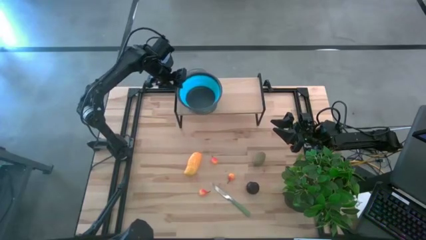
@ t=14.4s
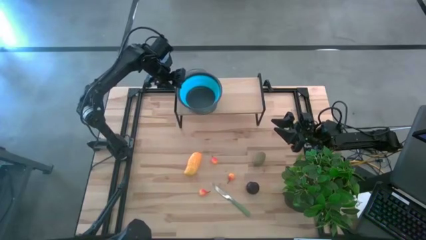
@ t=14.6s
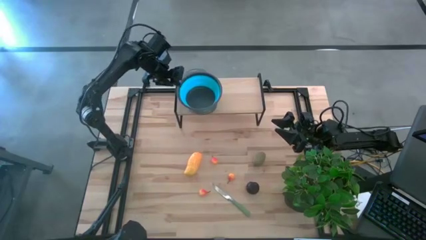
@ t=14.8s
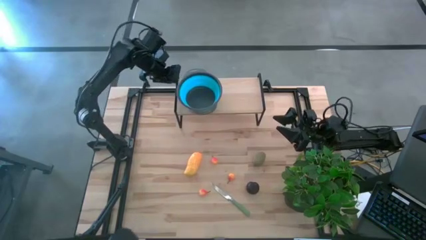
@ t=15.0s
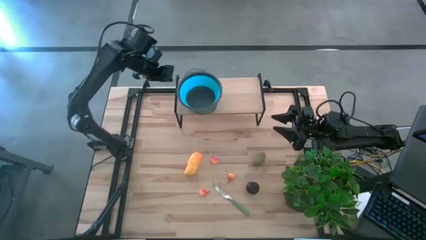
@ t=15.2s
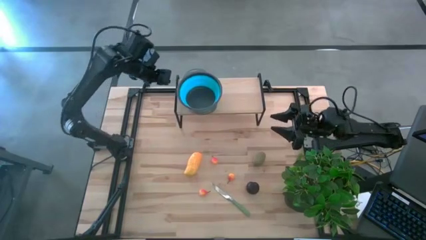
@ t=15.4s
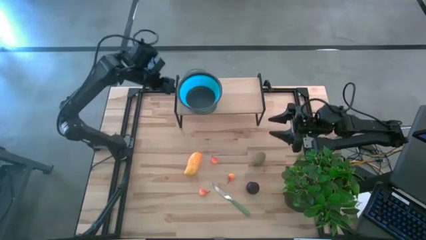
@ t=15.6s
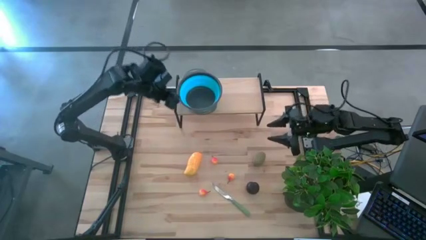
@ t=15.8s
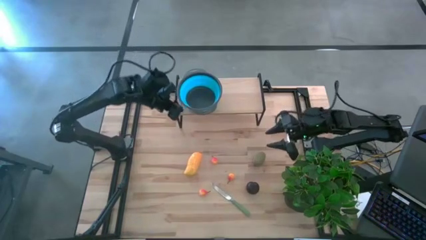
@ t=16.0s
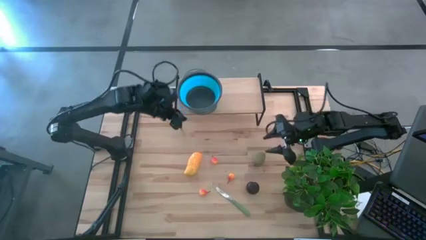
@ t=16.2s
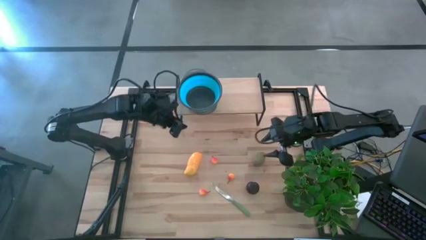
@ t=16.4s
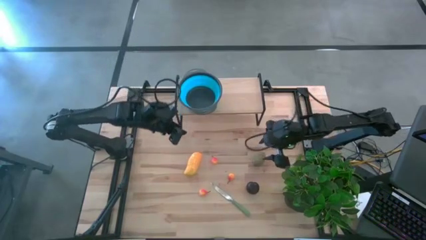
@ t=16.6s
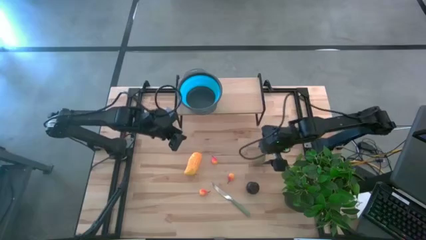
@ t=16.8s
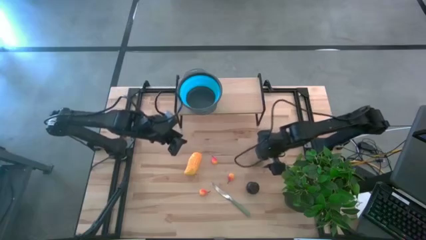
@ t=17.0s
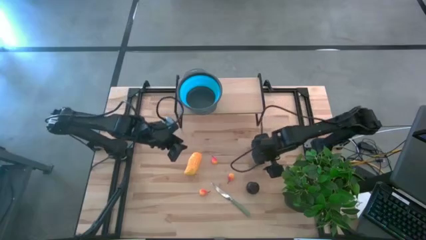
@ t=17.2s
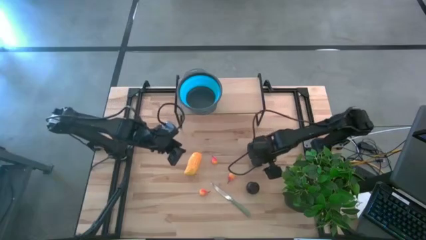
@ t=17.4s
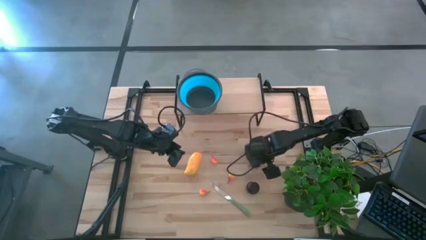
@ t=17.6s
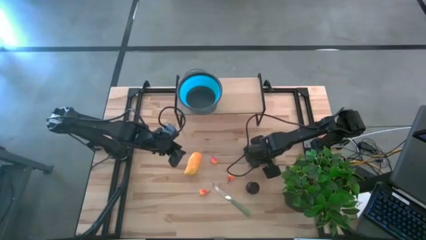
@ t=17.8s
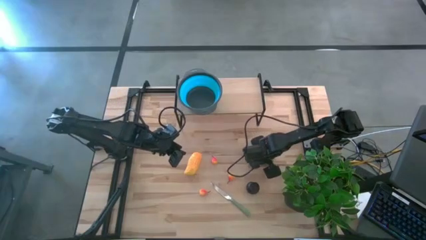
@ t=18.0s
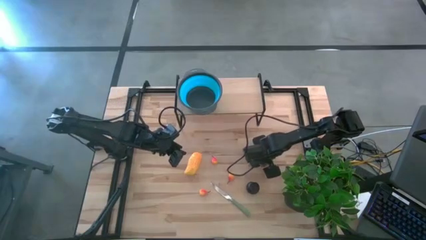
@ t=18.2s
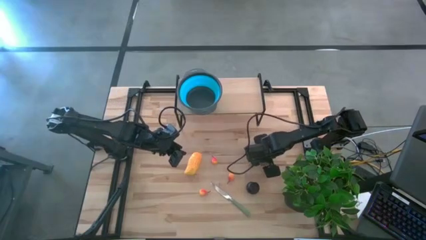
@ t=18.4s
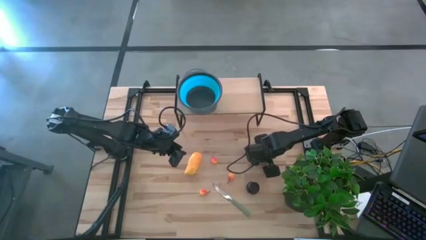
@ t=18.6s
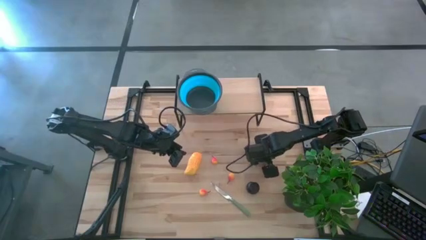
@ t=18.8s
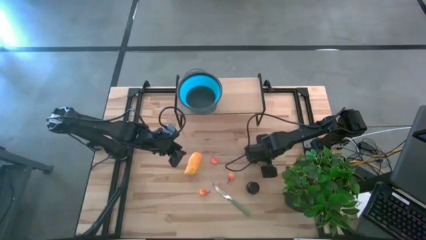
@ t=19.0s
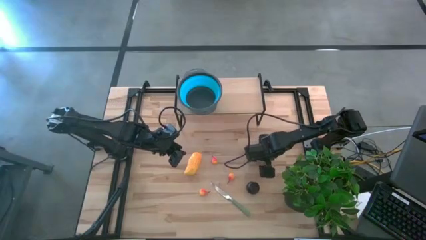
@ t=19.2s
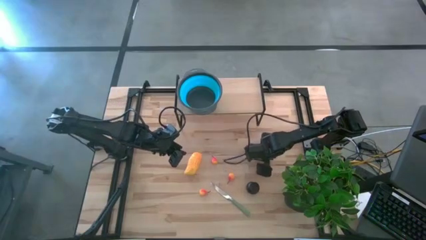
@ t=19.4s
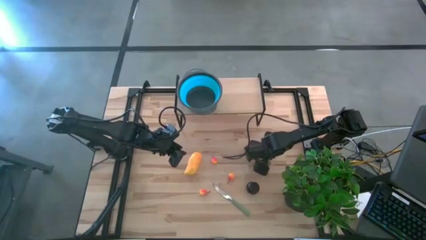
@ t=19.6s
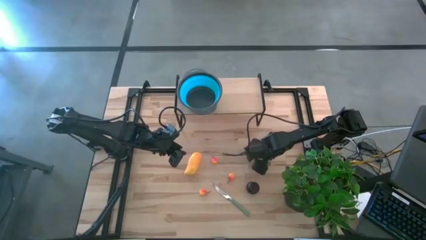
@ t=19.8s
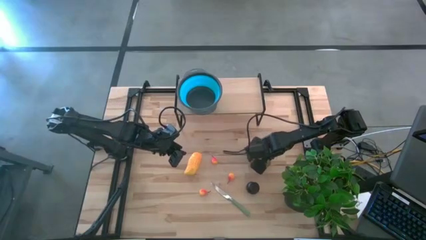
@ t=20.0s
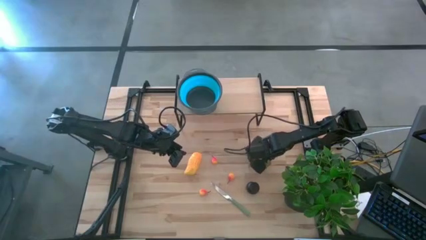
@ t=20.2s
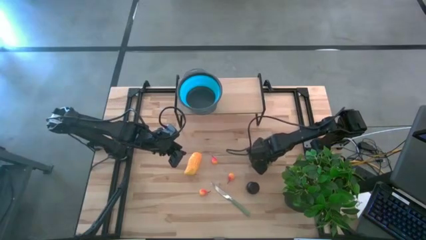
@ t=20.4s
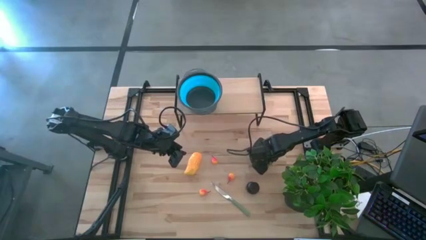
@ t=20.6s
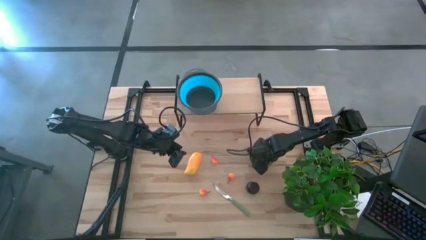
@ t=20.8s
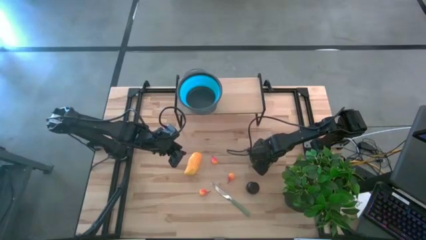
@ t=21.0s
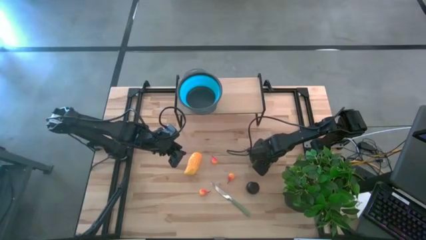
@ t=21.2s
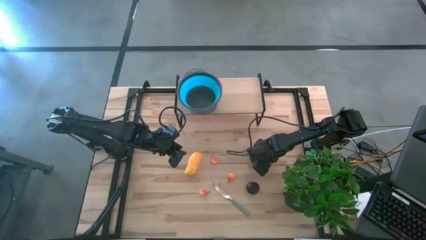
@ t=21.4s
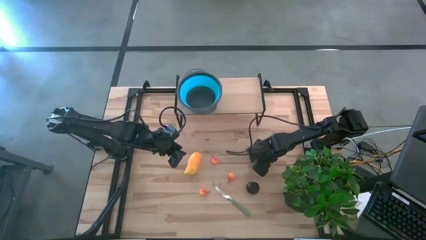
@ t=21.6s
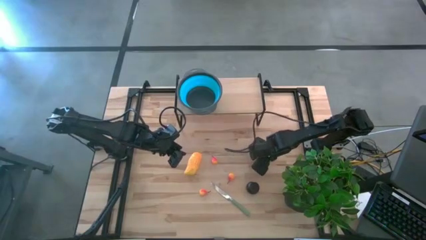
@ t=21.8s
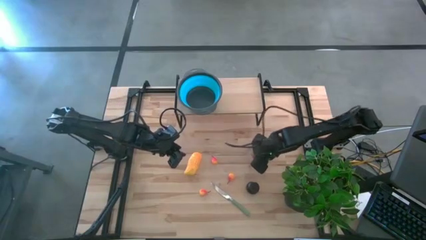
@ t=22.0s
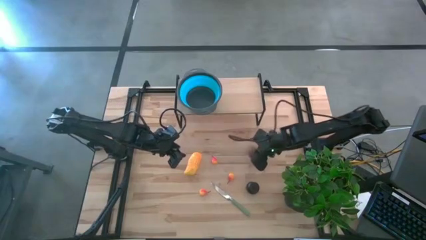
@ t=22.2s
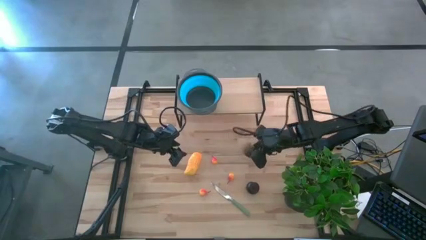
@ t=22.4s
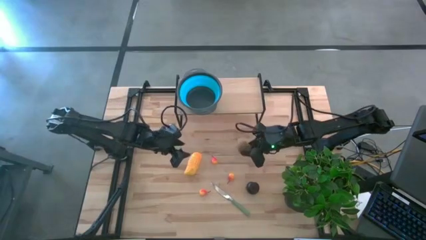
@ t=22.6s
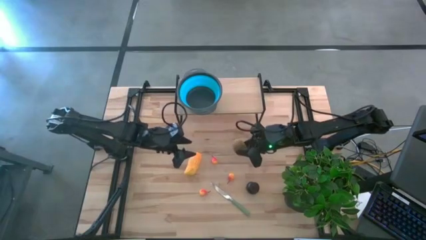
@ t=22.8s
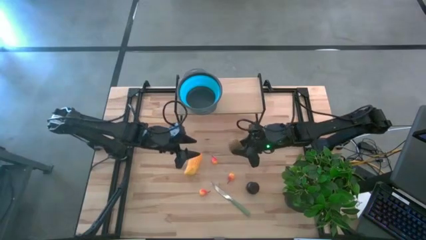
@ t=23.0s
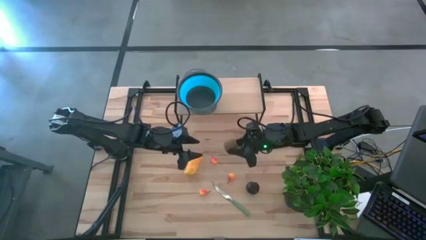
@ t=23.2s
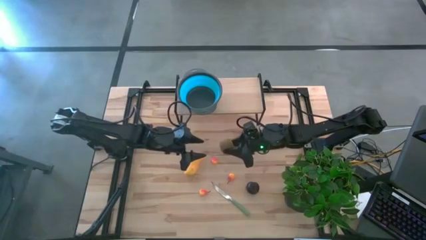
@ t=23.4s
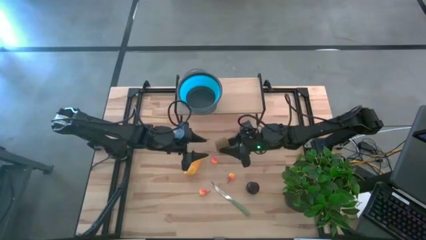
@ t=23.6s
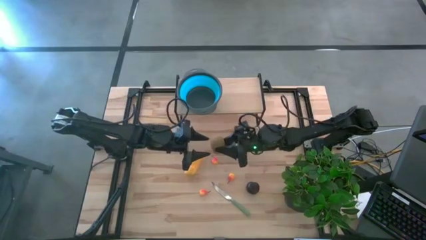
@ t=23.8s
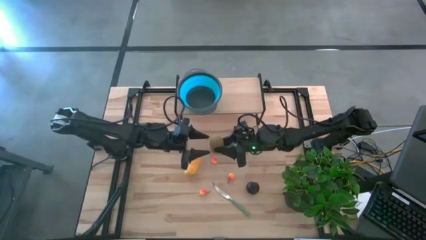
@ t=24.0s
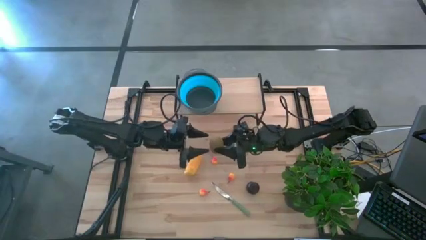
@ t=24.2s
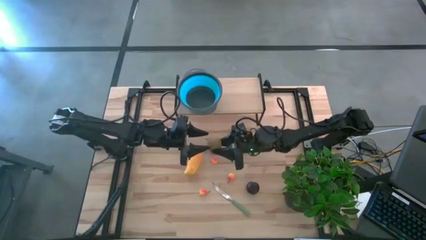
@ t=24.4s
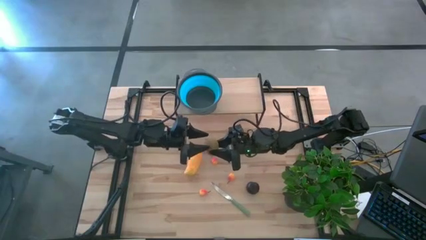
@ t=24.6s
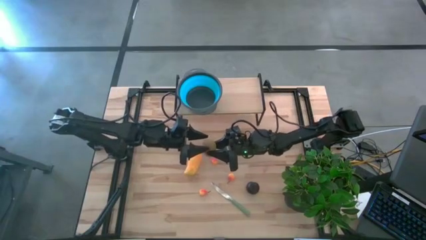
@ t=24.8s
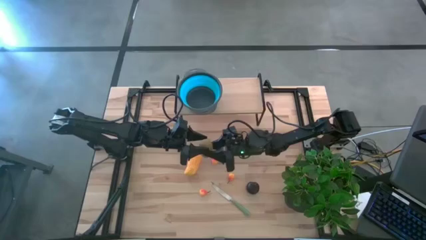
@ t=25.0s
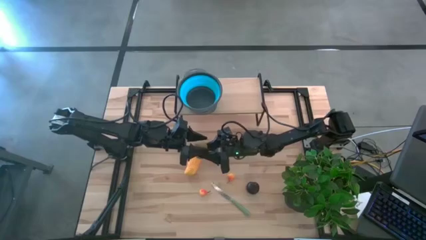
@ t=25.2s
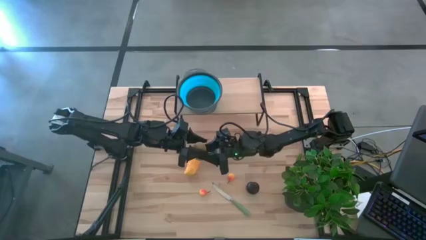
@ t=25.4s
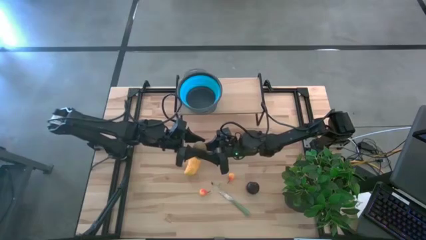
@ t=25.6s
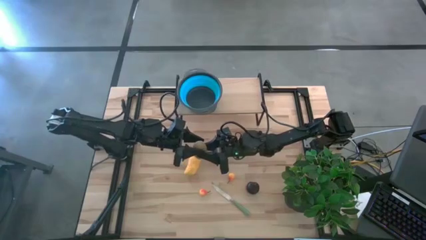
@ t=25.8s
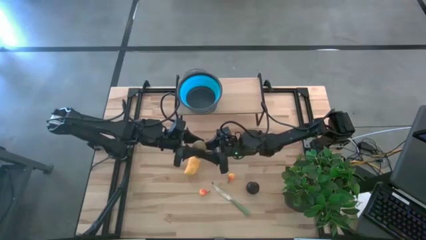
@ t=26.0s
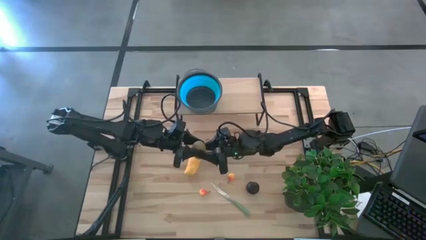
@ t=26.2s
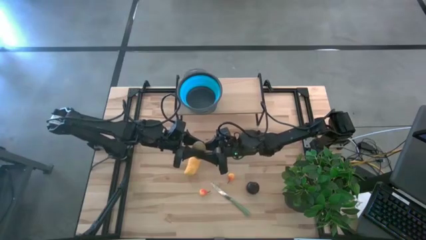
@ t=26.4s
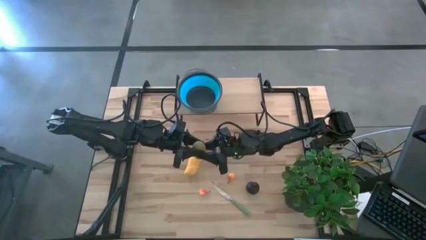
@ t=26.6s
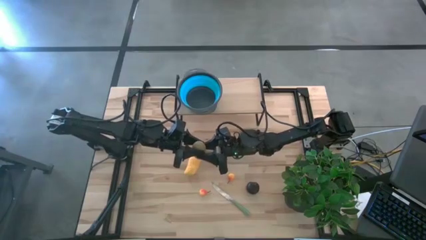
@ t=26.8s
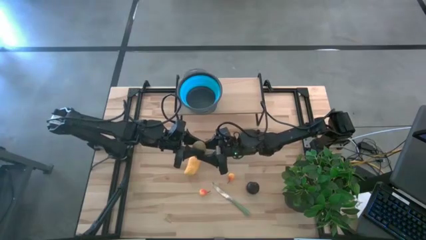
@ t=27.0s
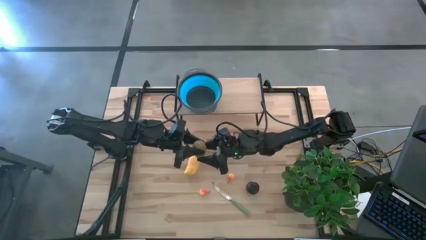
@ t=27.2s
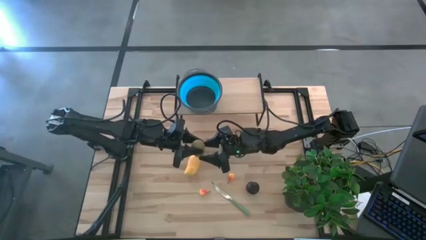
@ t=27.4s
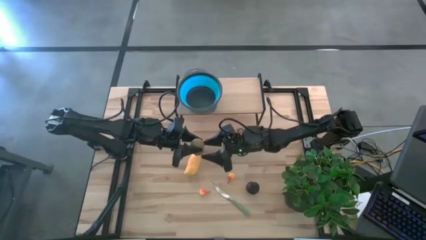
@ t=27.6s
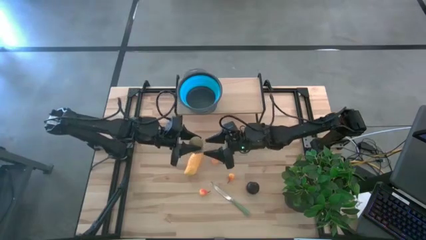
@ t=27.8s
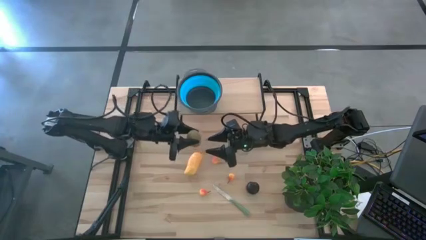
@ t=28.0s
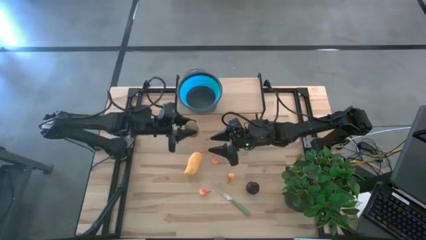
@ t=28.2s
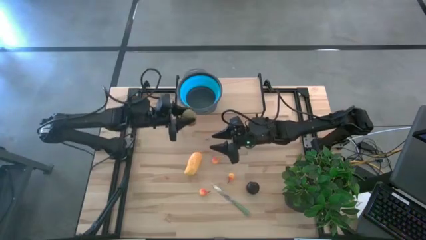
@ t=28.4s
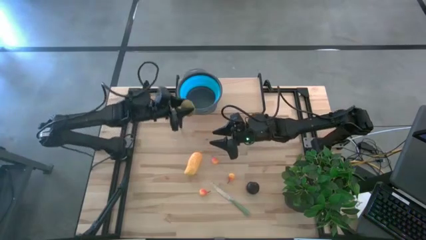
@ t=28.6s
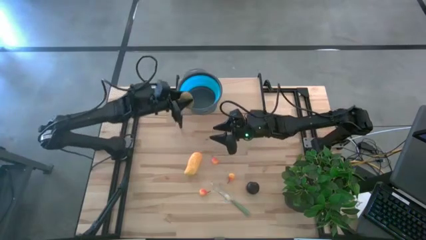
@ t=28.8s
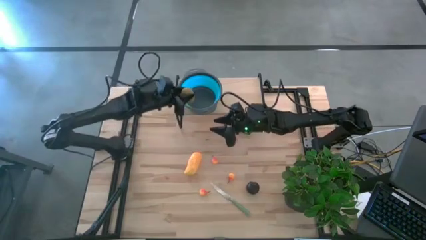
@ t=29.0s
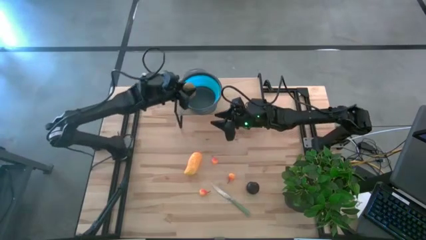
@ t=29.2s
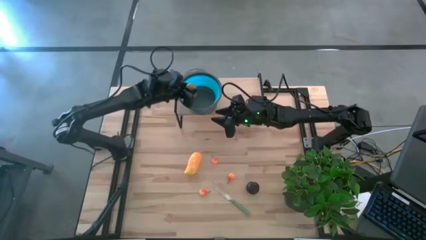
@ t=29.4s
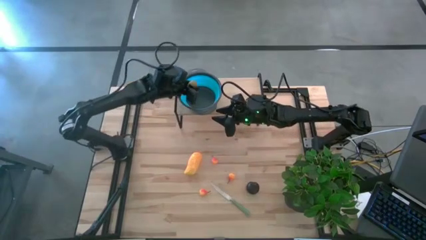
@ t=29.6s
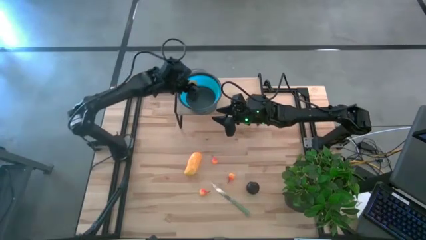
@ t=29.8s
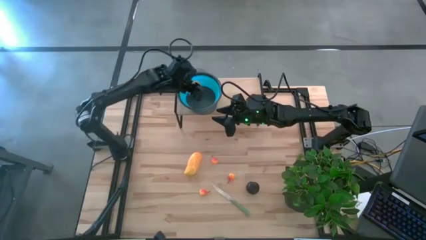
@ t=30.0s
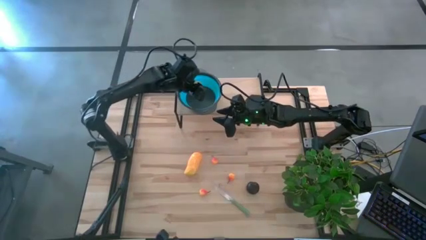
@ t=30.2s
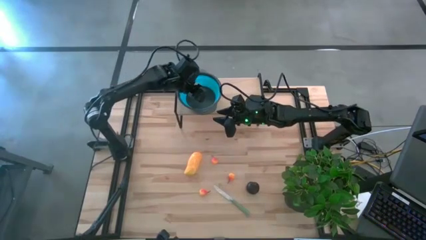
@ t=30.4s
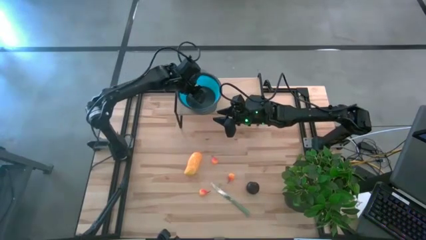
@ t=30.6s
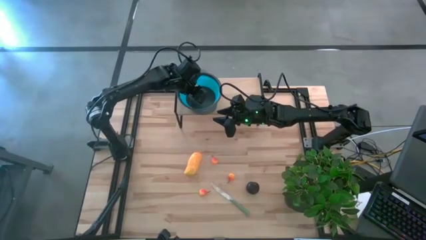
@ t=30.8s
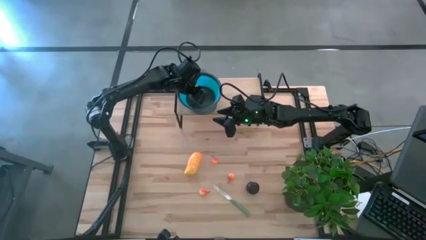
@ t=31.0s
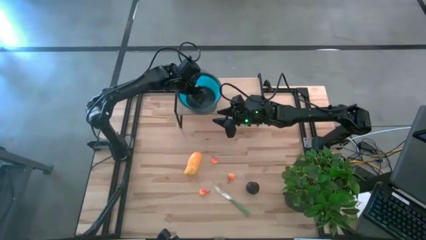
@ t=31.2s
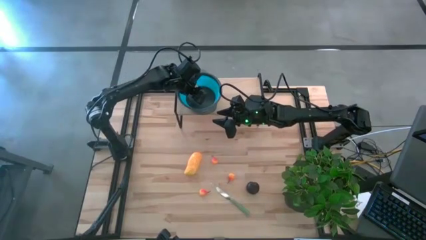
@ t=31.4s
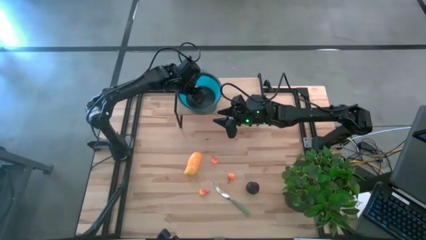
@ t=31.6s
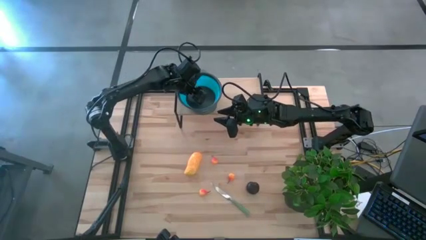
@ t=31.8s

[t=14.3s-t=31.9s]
Task: Pick & Place Fruit
Put the kiwi into the blue strainer bowl on the shelf
